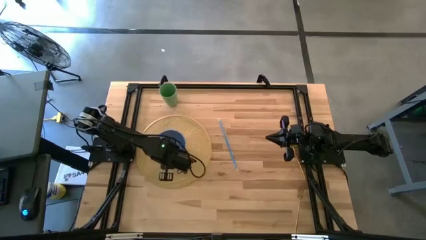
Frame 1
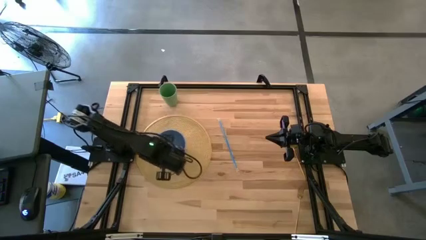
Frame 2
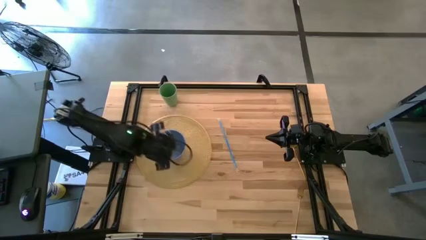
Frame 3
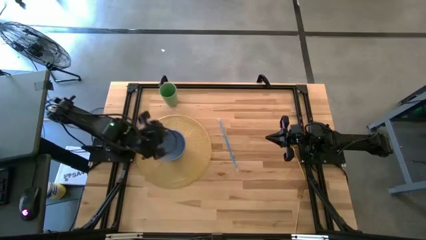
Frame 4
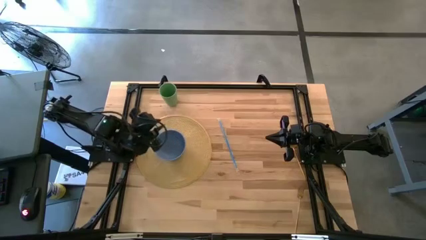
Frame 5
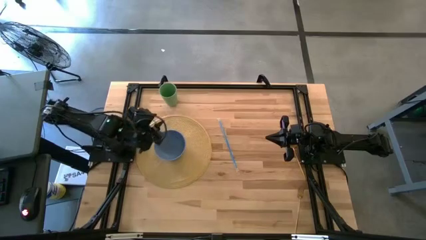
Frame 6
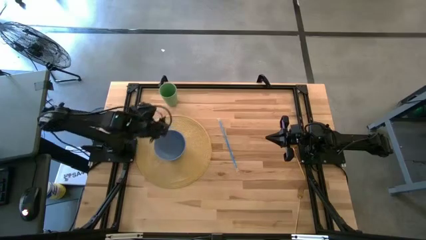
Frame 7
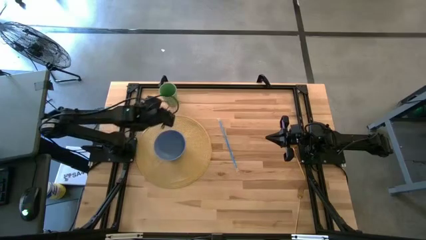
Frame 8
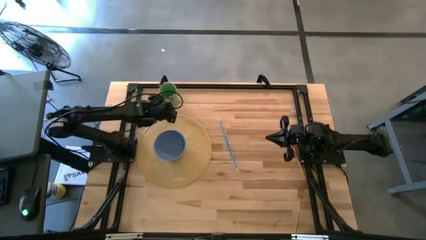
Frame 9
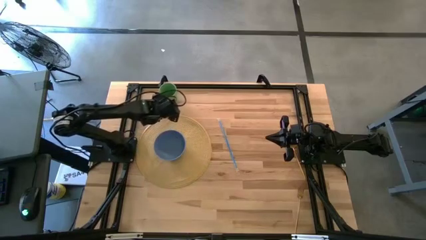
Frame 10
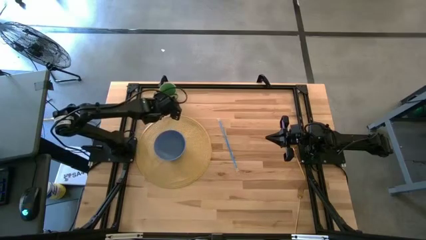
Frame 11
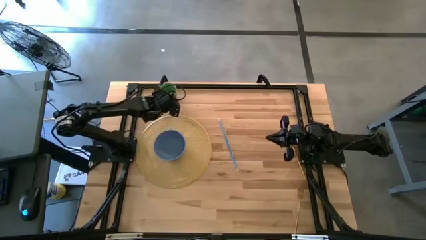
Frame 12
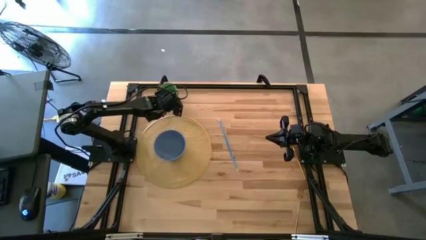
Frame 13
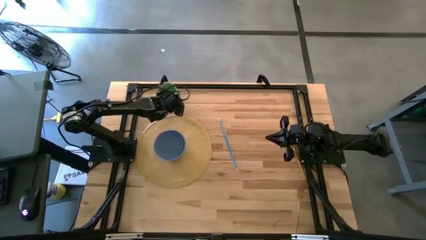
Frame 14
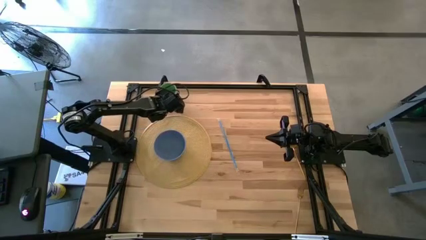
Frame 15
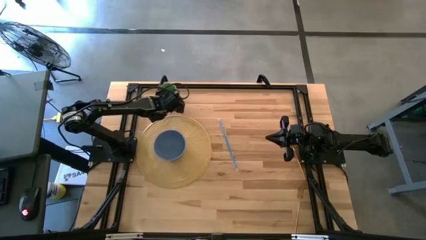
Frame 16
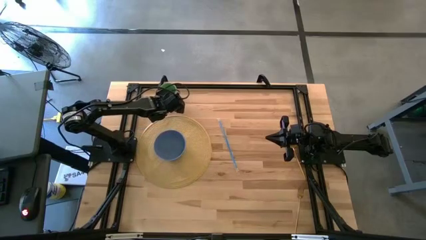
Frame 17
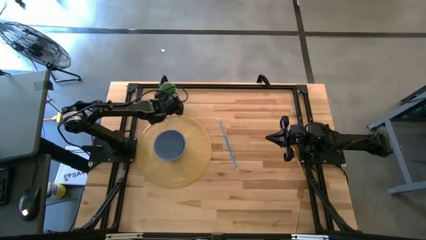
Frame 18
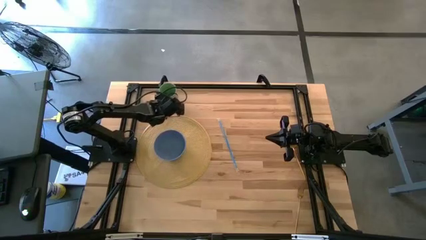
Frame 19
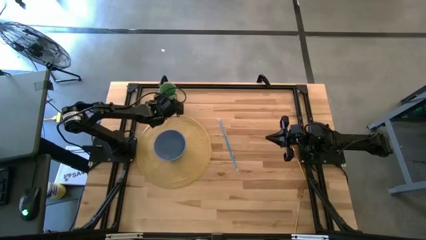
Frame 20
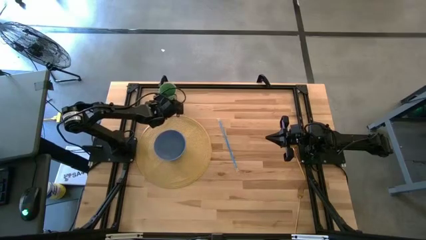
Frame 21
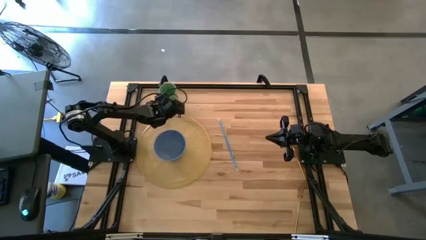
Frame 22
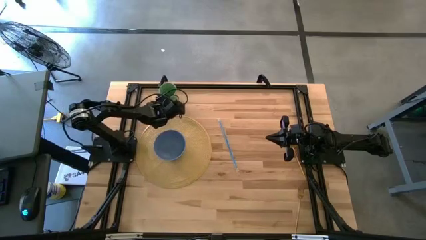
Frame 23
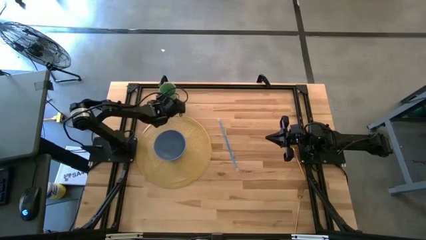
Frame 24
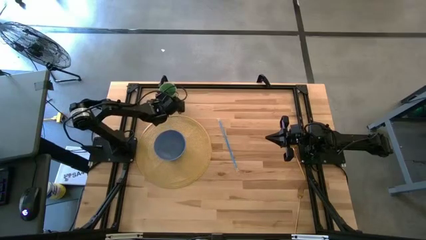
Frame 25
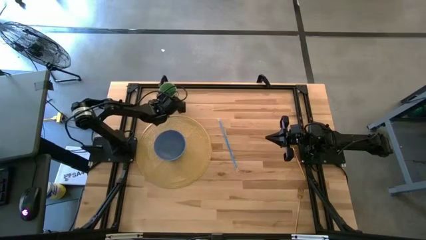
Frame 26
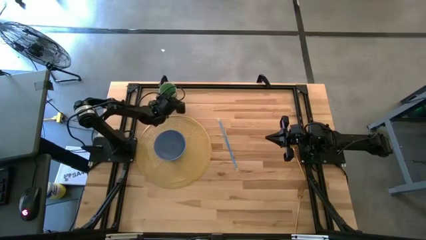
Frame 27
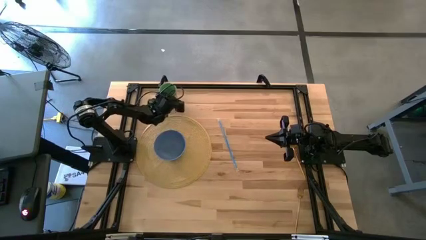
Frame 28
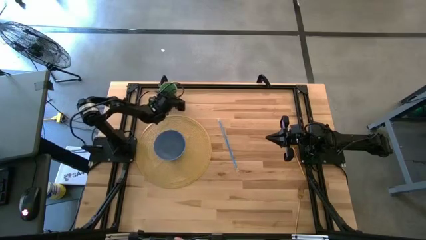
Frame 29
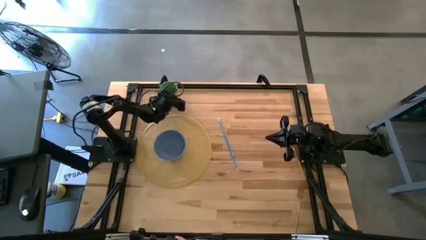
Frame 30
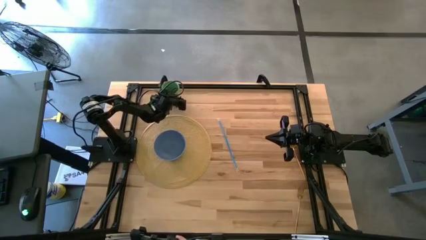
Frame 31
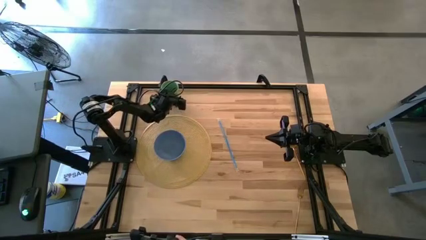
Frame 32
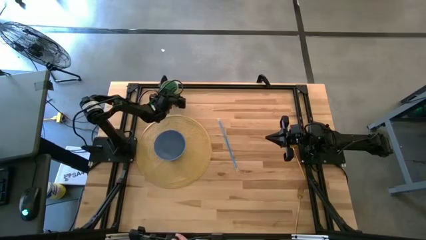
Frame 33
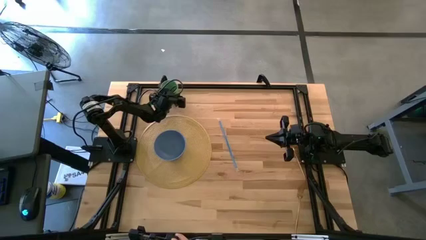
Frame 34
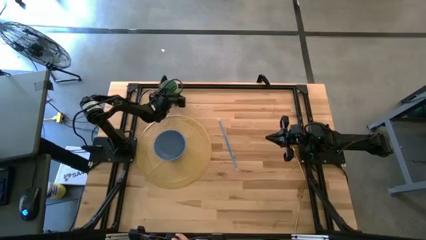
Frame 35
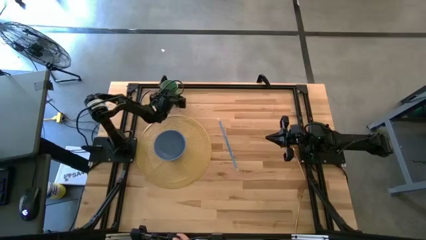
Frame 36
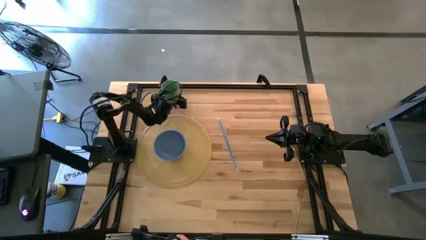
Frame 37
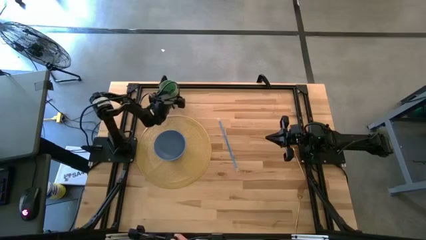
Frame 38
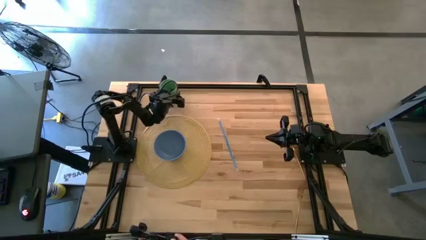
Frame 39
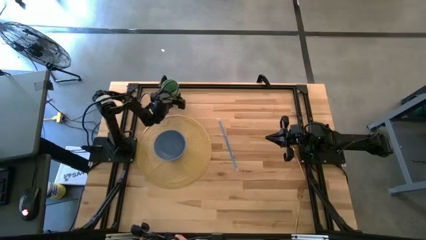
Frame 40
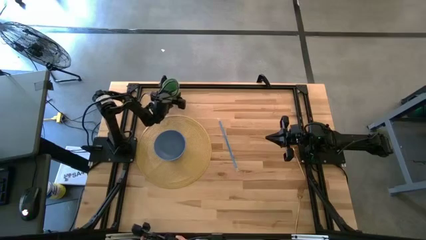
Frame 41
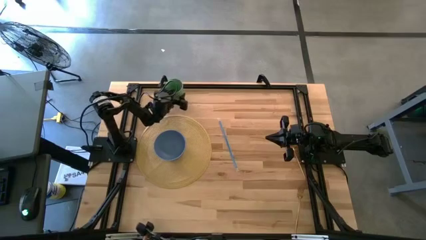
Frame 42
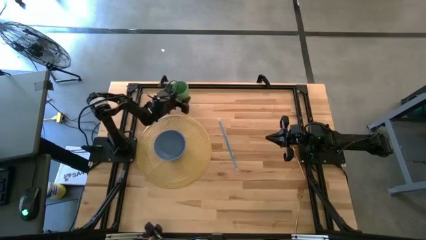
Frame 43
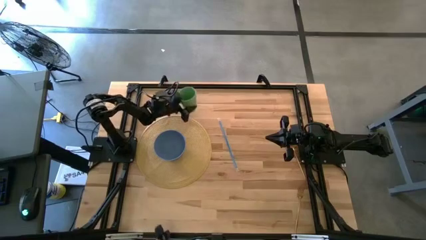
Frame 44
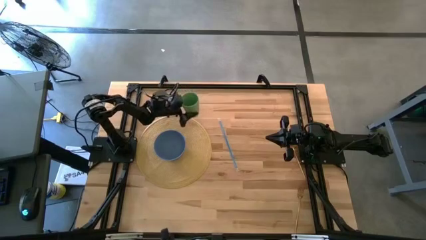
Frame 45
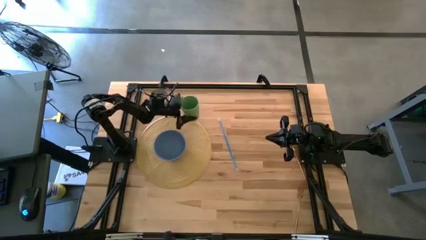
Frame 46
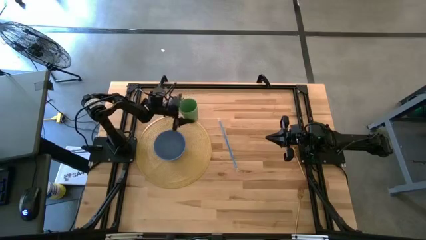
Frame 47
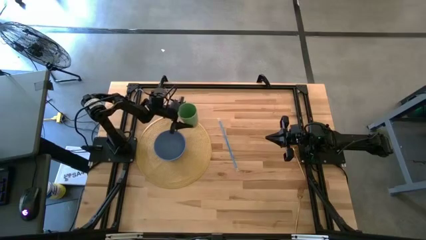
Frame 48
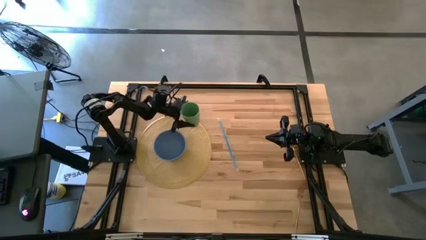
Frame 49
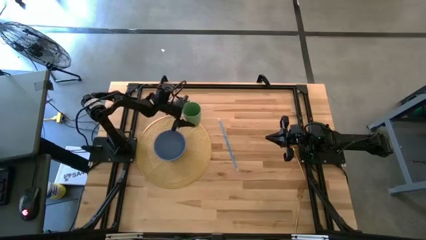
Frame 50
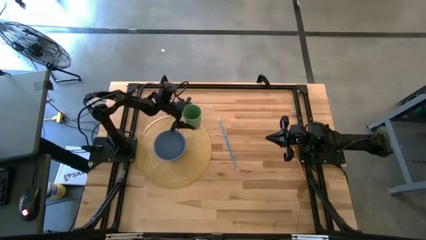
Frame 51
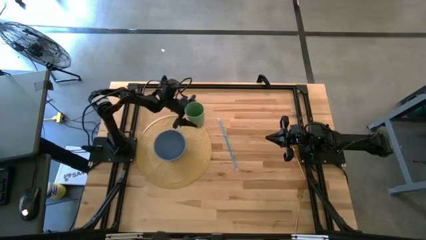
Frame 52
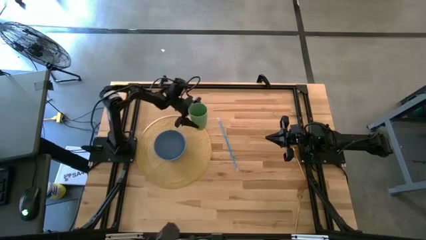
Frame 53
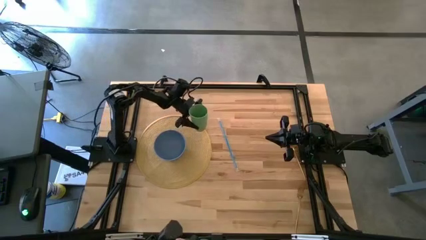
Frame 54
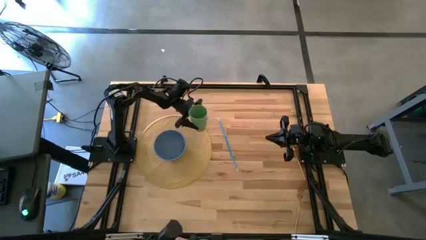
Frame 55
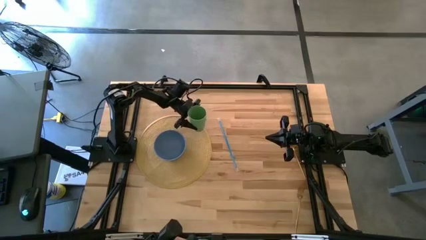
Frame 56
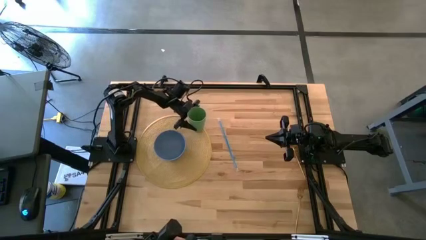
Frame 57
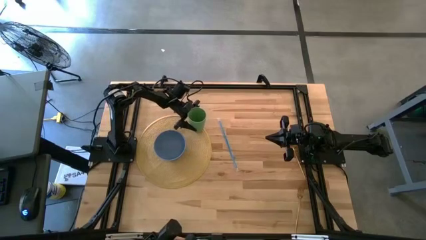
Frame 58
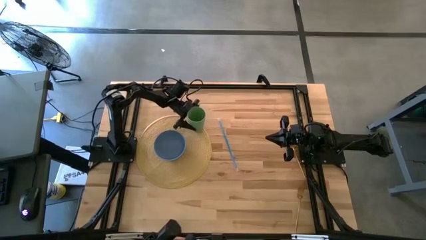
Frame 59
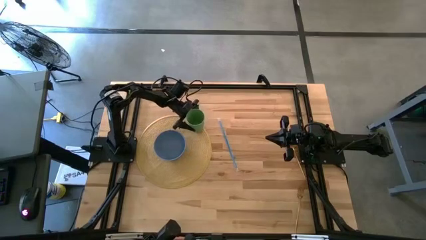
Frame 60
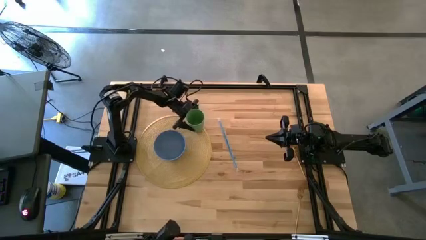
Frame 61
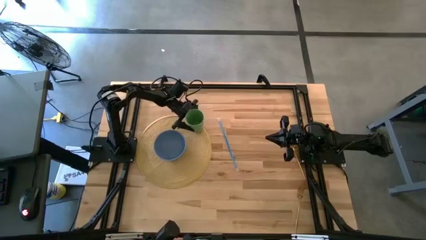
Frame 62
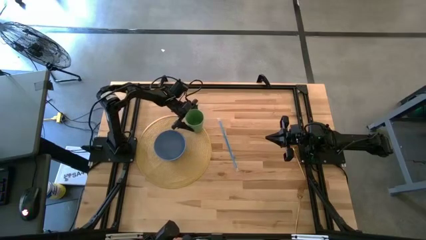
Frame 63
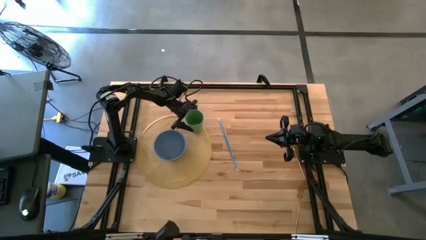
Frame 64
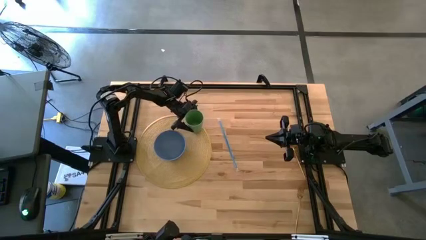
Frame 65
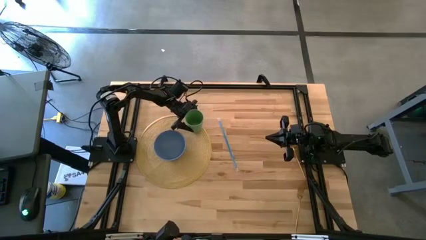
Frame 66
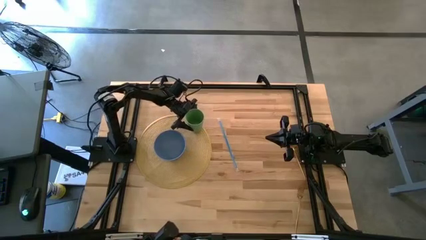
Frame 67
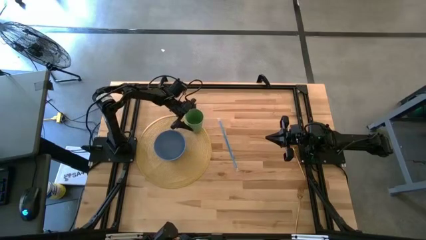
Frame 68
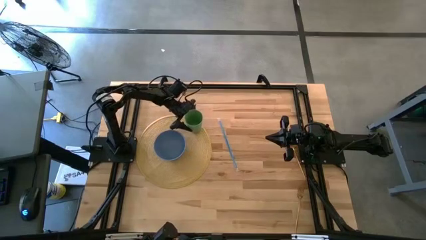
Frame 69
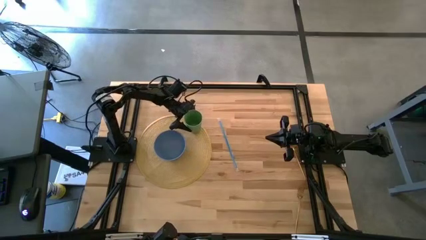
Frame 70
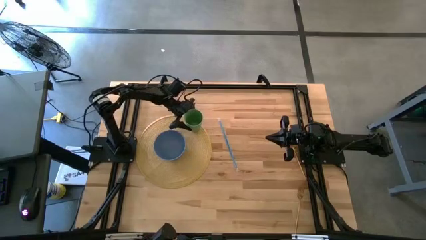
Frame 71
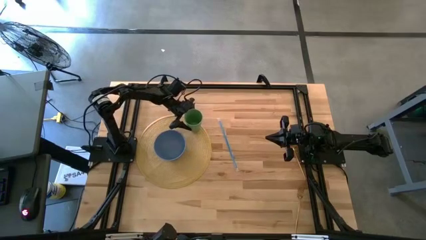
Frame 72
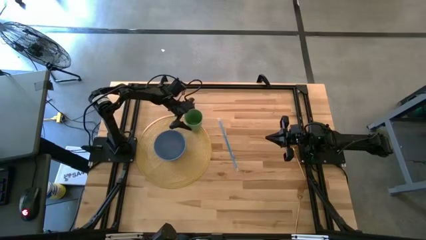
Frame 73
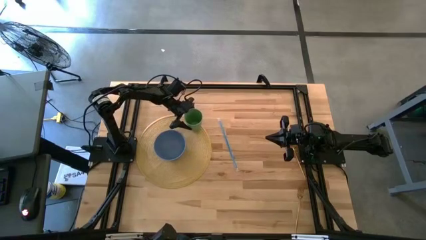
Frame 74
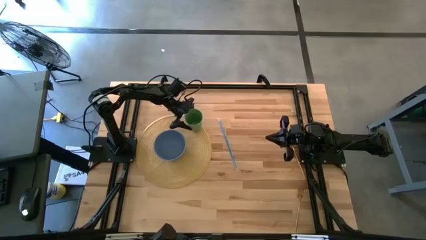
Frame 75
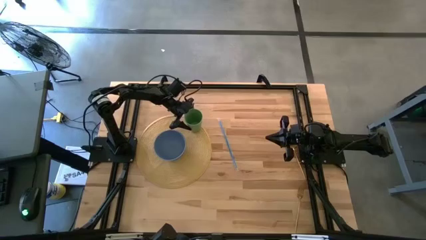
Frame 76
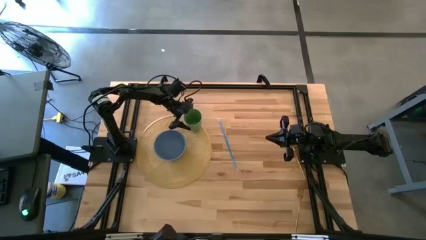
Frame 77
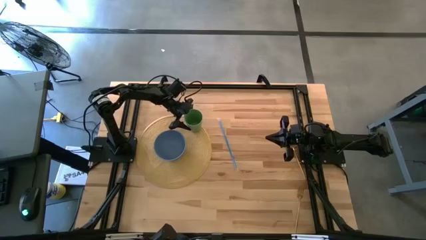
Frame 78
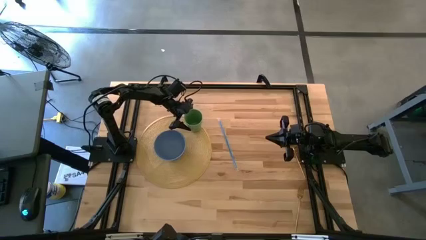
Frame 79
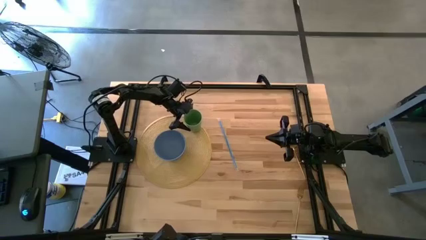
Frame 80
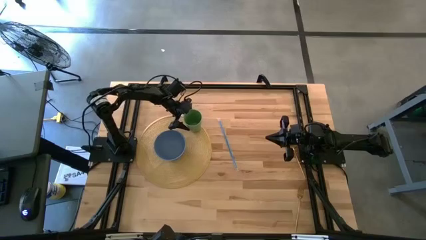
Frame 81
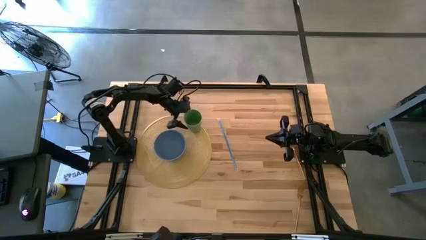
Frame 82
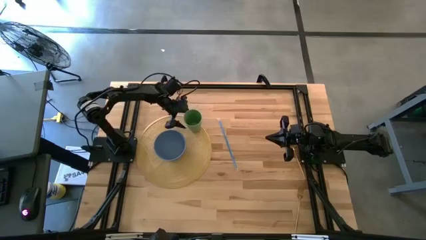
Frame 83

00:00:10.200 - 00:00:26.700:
Task: Pick & Place Utensil
Put the green cup to the top right of the blue bowl on the brown mat
